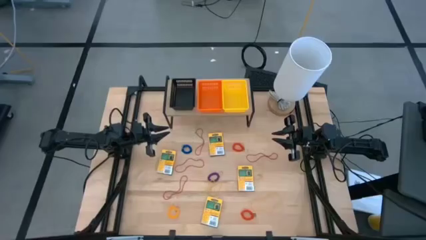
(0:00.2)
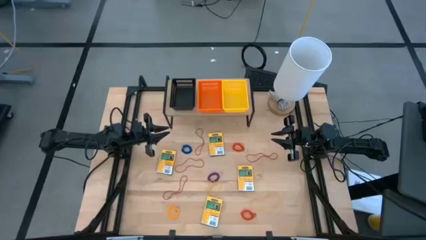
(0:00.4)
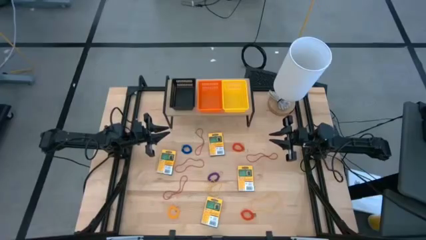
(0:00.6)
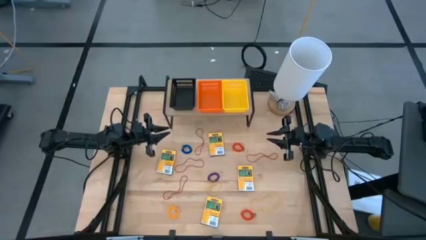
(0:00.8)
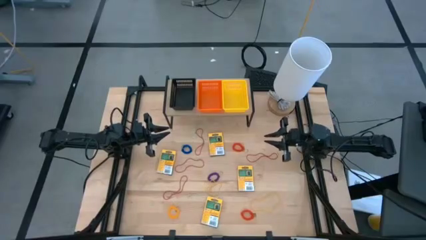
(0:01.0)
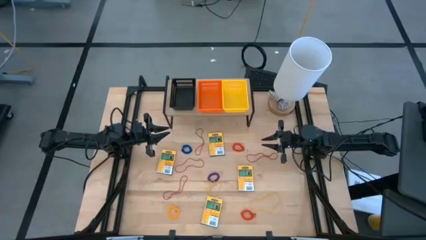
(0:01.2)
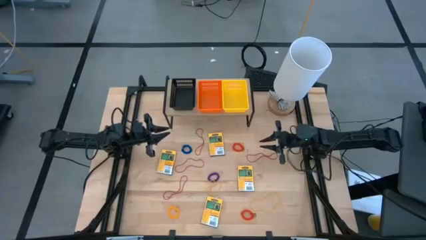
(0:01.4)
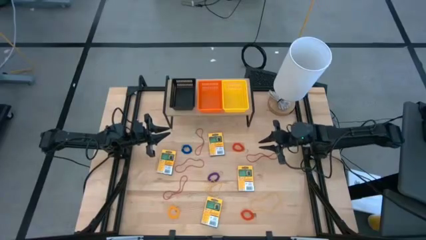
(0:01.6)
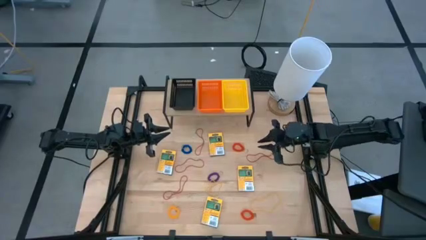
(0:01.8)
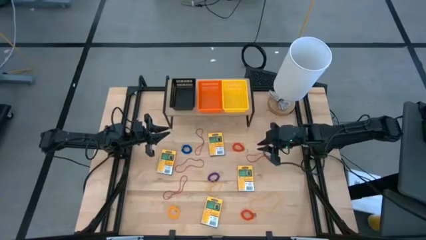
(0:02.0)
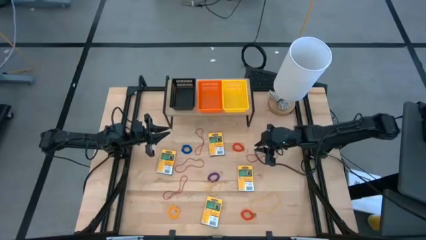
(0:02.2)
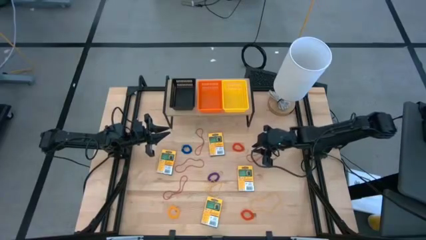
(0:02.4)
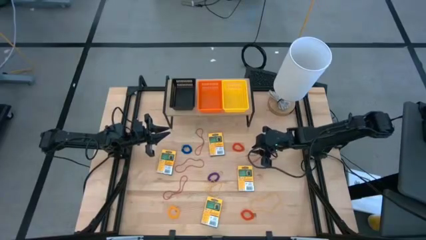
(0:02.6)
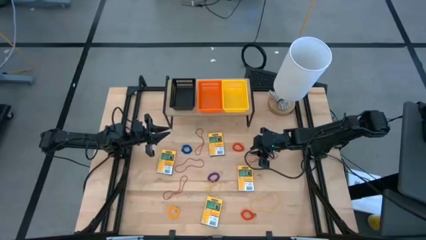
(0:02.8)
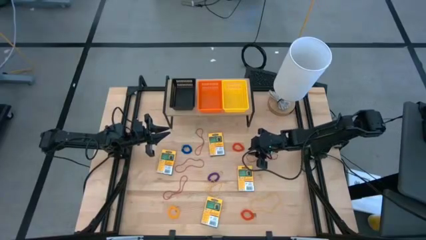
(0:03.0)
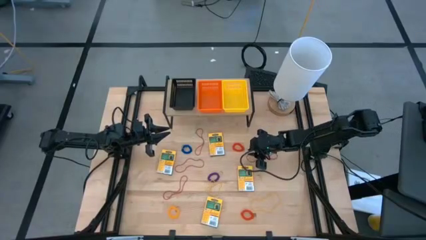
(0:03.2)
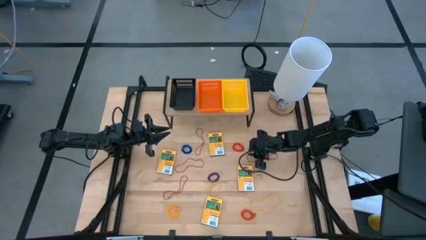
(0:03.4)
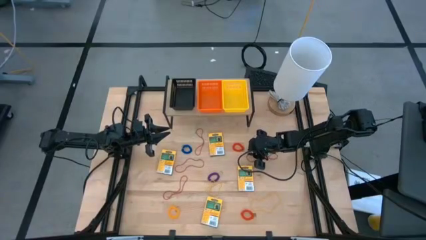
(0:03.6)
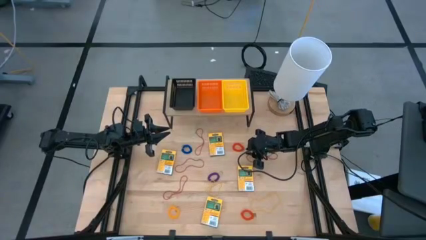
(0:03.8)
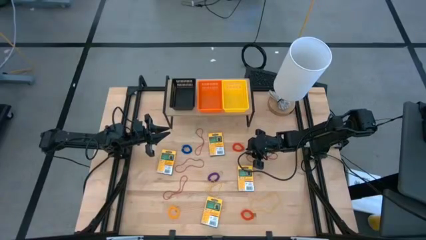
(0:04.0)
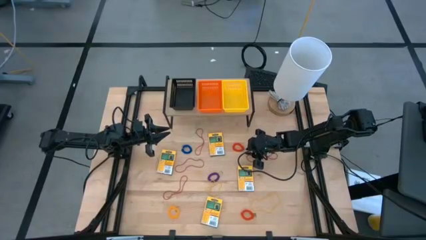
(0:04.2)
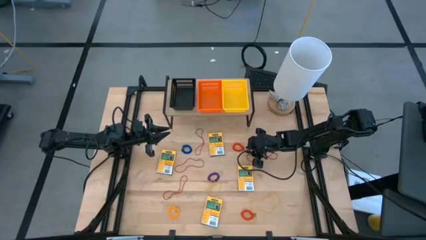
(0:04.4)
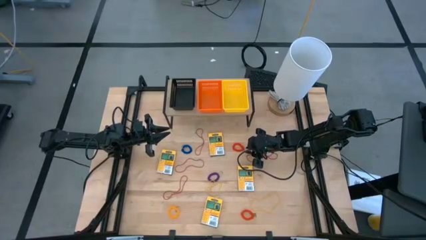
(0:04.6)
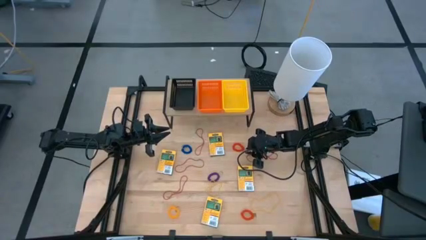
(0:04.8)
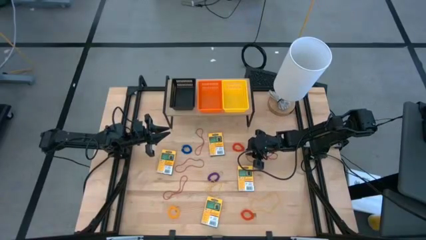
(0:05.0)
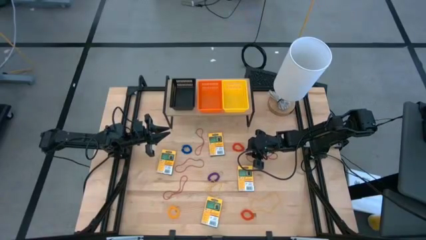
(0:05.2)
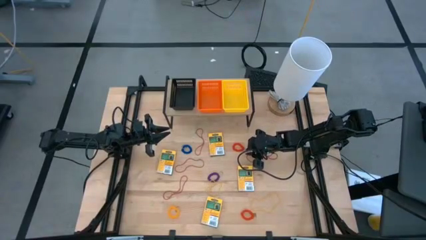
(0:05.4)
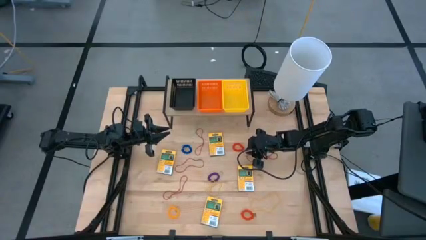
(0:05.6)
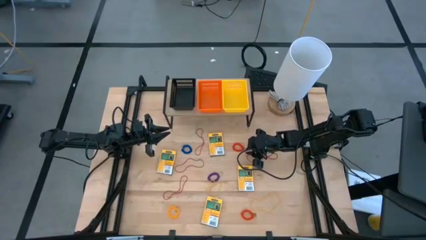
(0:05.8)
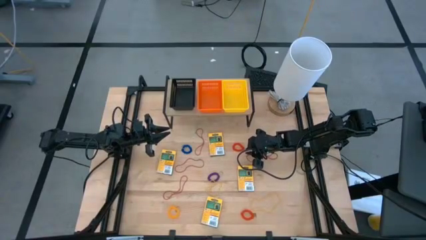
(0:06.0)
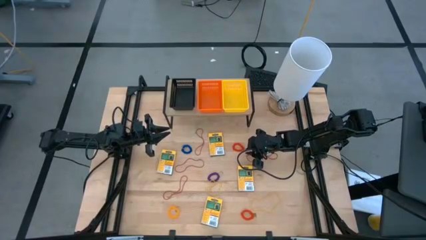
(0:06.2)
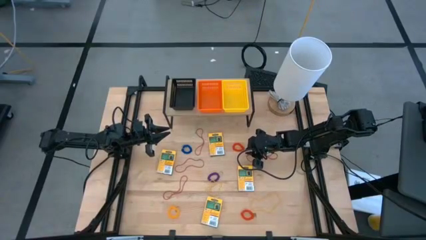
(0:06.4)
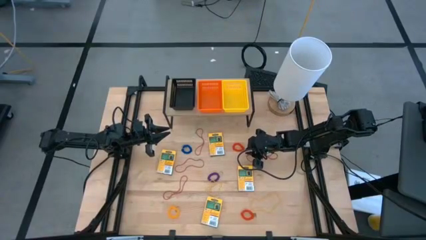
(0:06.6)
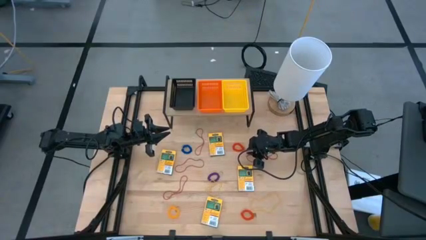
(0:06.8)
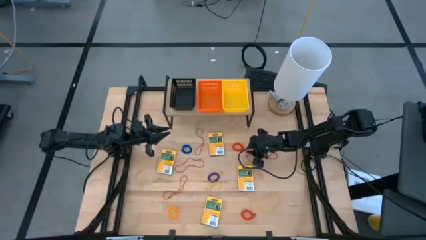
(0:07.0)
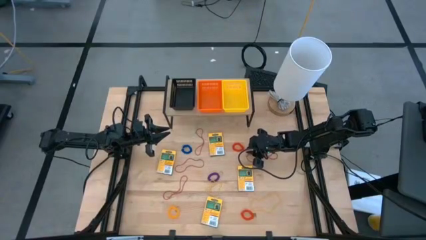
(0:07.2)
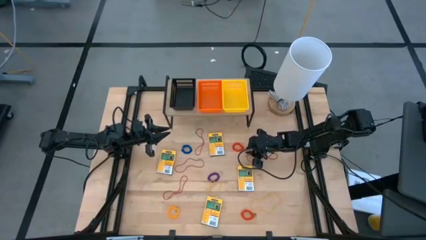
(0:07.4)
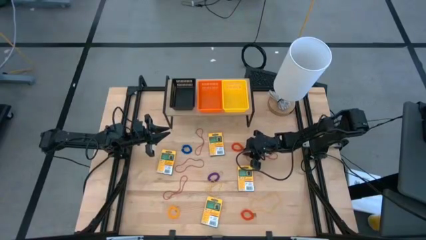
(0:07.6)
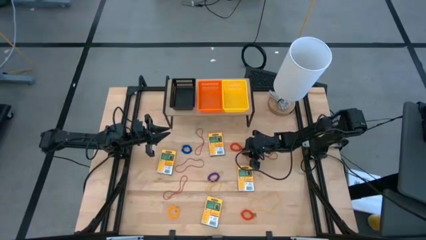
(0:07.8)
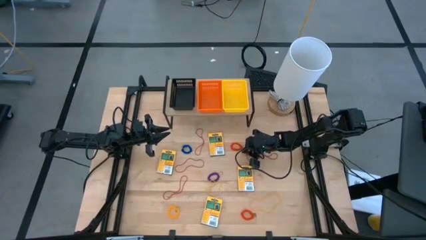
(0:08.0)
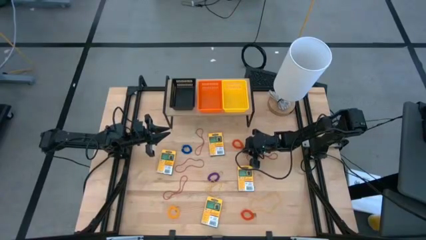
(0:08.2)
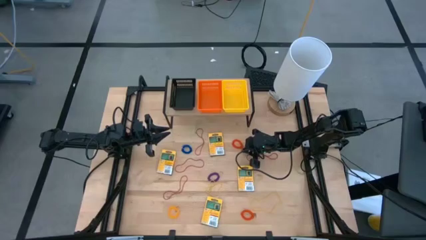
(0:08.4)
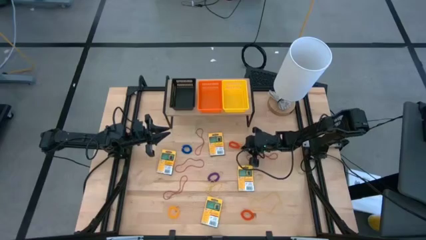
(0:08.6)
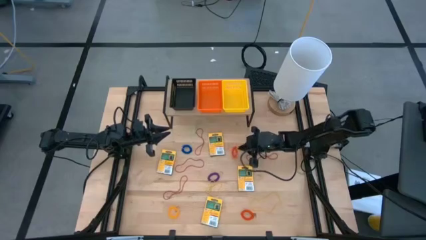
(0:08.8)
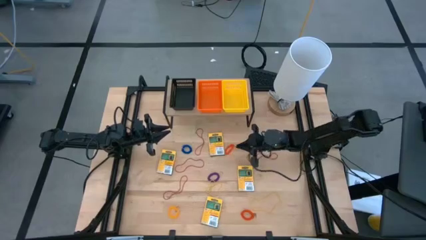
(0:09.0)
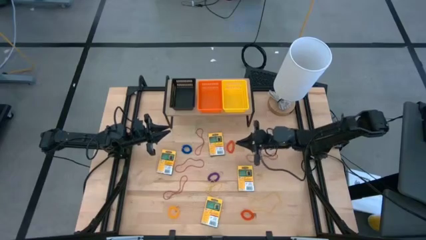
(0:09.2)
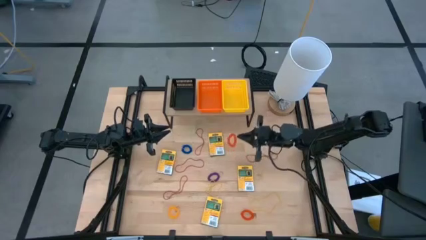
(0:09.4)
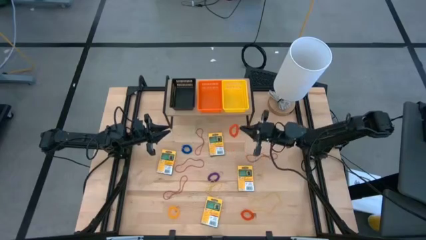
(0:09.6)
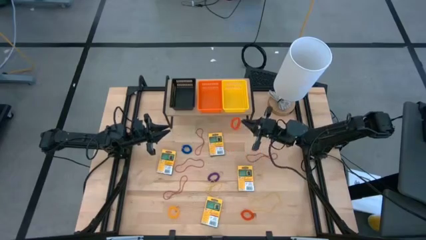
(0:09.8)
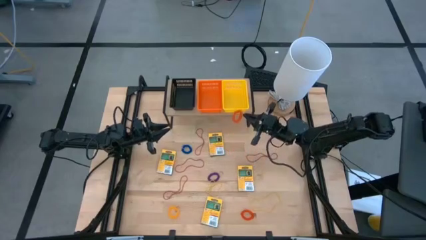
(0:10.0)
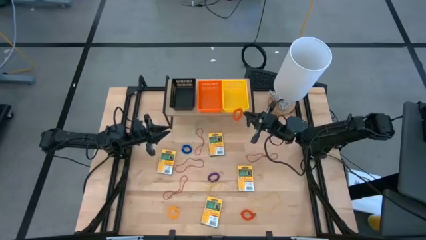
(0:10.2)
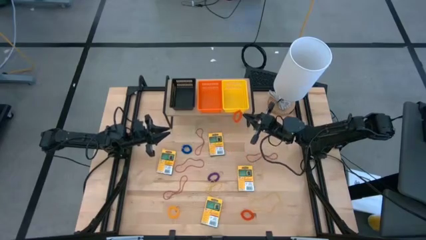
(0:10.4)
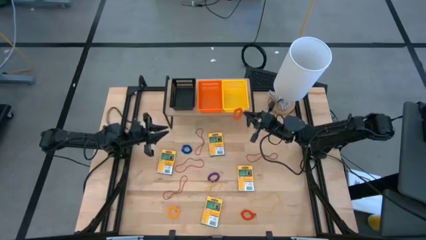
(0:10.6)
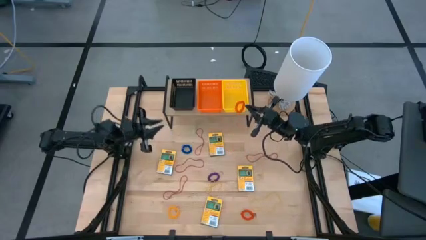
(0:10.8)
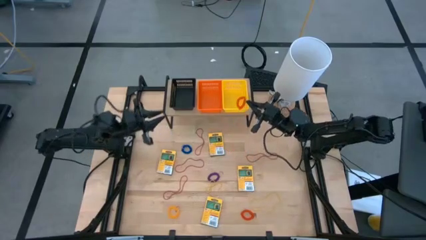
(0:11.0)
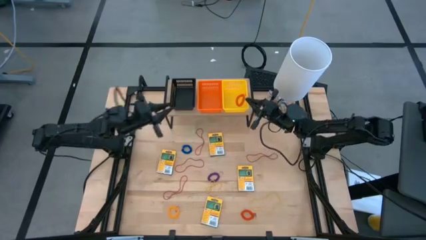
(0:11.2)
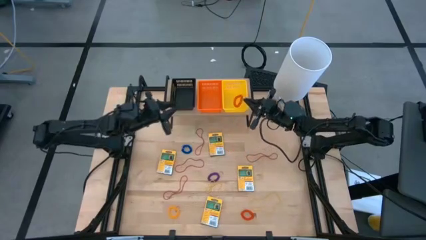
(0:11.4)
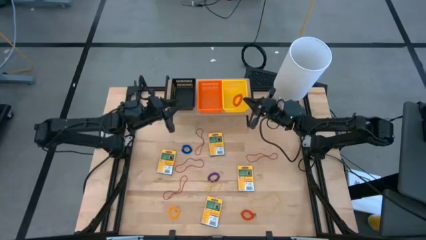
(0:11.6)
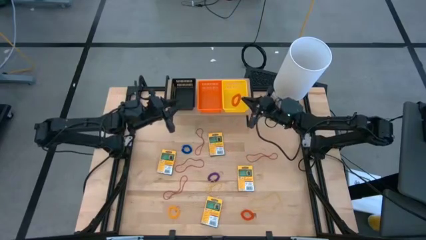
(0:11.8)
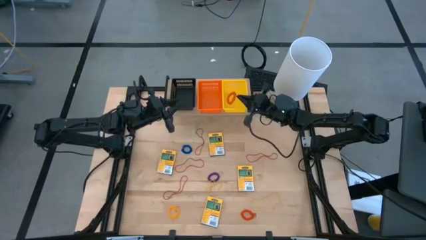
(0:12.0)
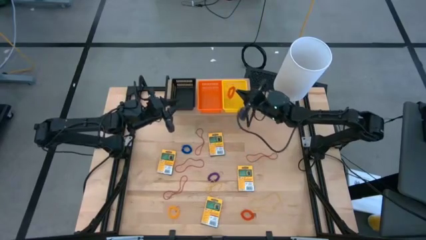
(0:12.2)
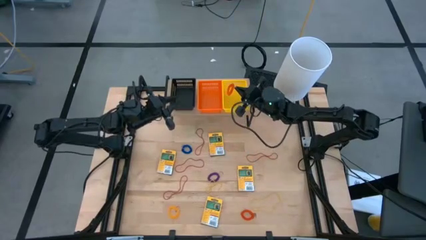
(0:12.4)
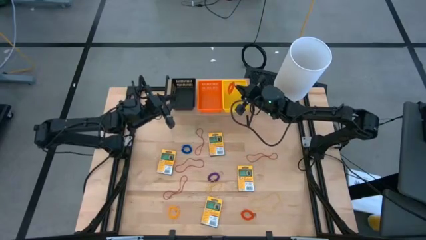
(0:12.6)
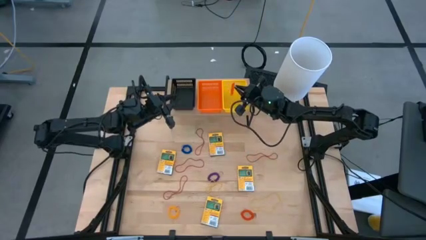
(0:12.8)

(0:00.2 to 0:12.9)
Task: Pick & Place Office Desk Supplies
Put the orange spring keychain into the yellow bin on the shelf
